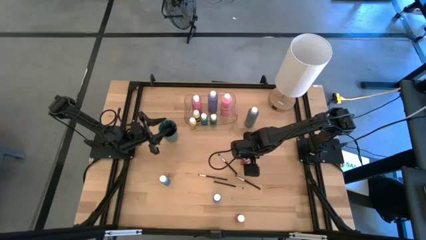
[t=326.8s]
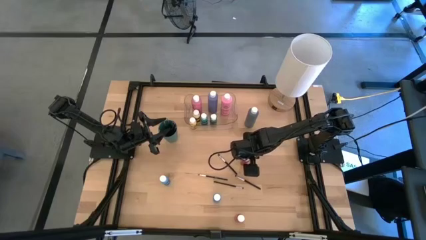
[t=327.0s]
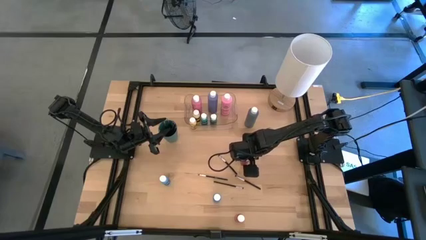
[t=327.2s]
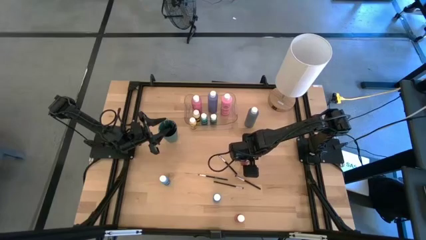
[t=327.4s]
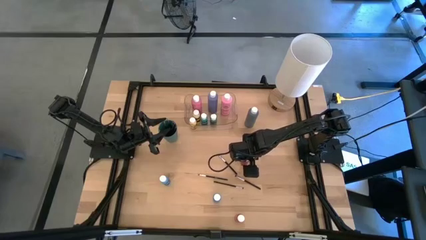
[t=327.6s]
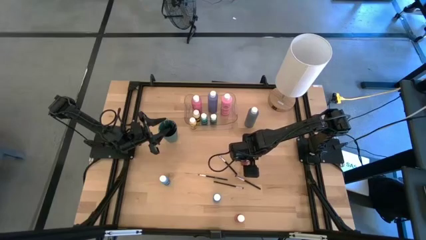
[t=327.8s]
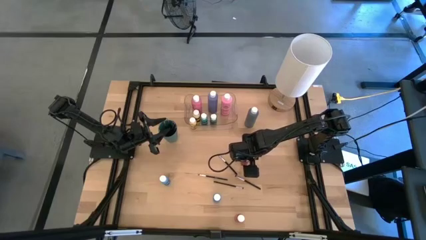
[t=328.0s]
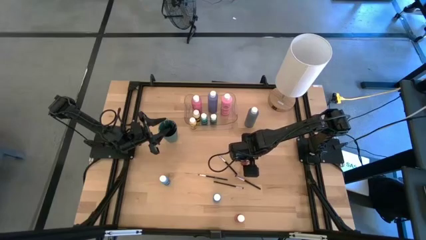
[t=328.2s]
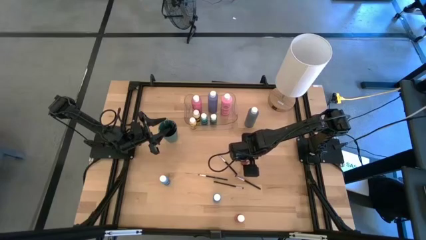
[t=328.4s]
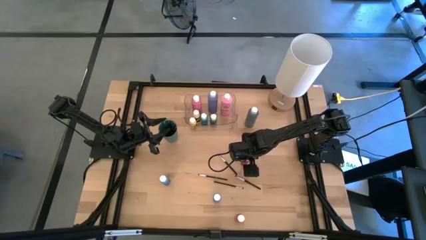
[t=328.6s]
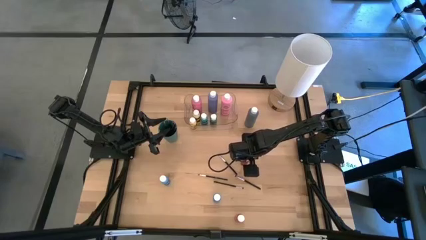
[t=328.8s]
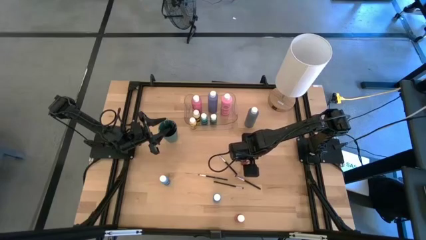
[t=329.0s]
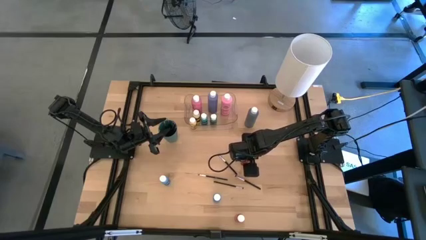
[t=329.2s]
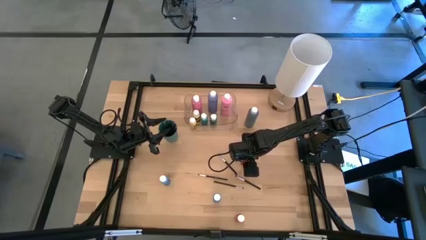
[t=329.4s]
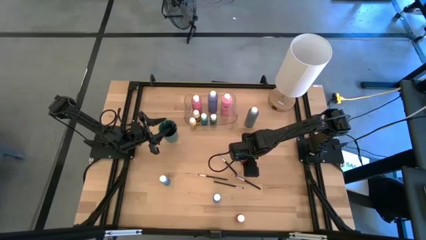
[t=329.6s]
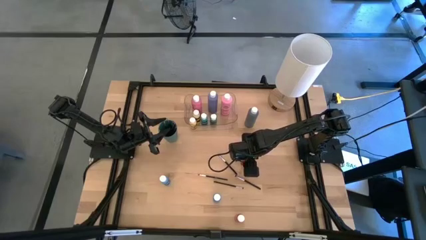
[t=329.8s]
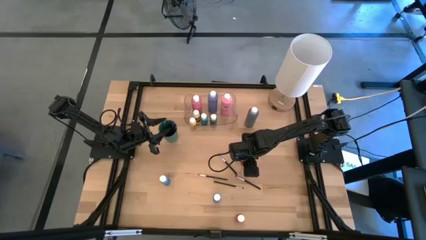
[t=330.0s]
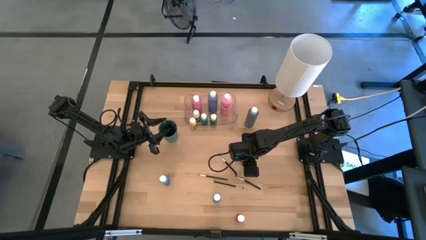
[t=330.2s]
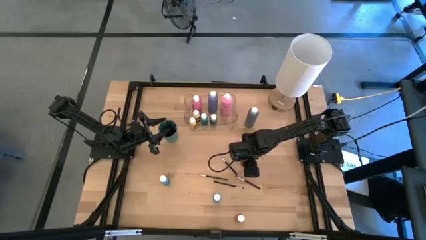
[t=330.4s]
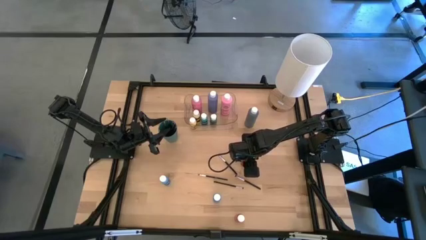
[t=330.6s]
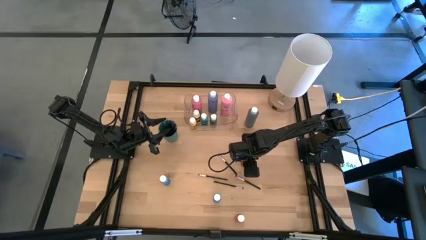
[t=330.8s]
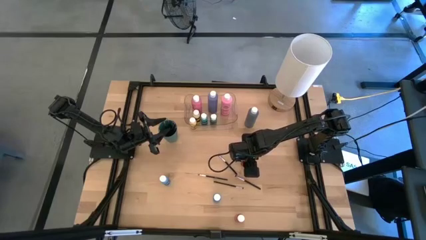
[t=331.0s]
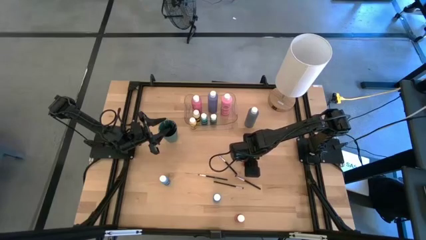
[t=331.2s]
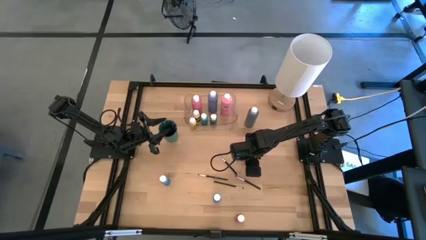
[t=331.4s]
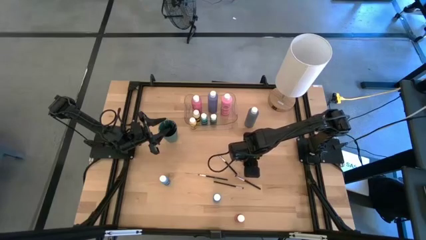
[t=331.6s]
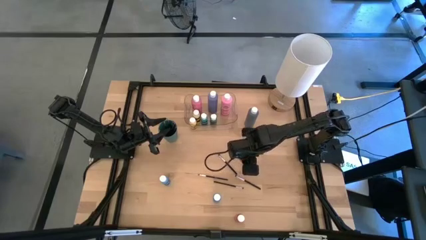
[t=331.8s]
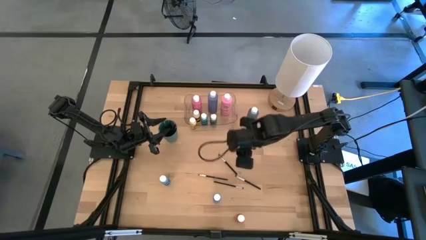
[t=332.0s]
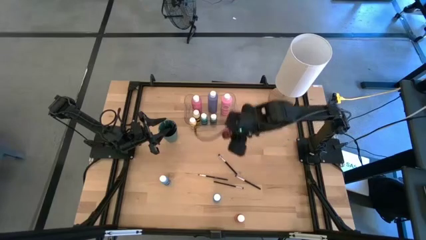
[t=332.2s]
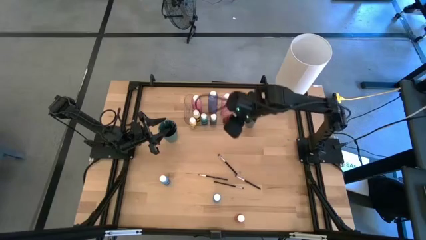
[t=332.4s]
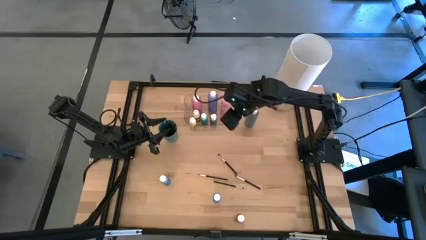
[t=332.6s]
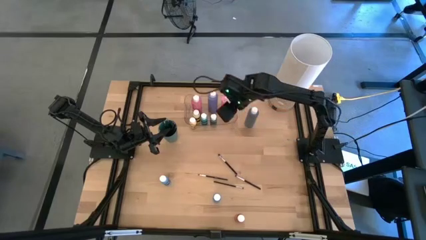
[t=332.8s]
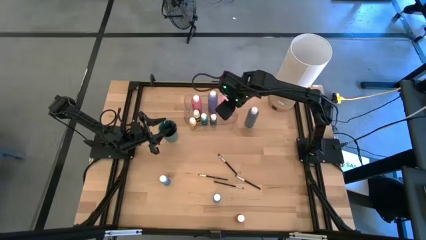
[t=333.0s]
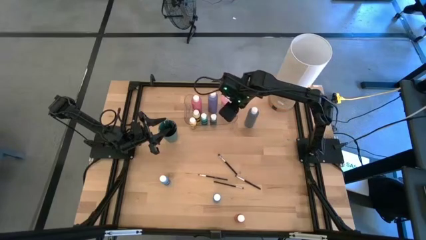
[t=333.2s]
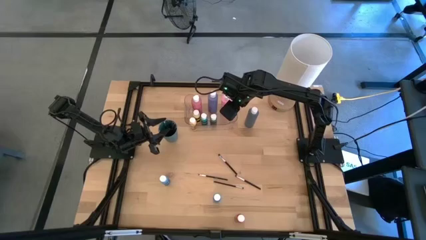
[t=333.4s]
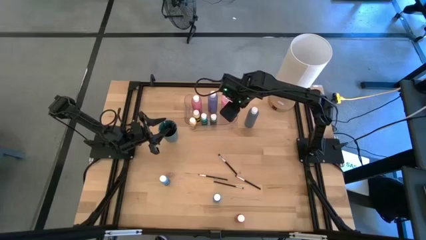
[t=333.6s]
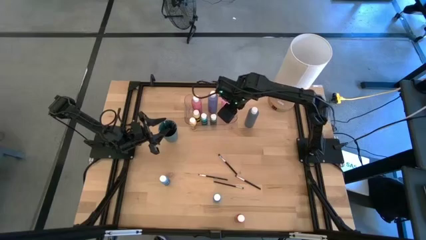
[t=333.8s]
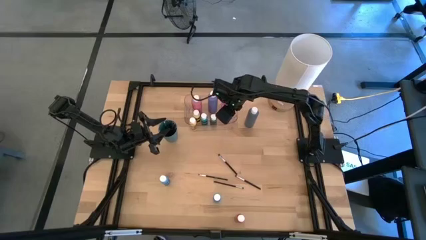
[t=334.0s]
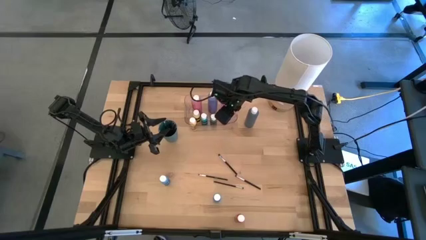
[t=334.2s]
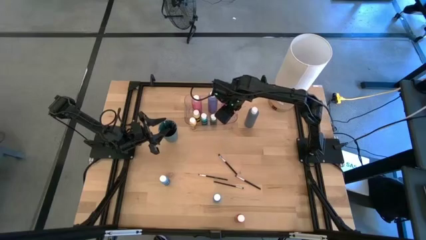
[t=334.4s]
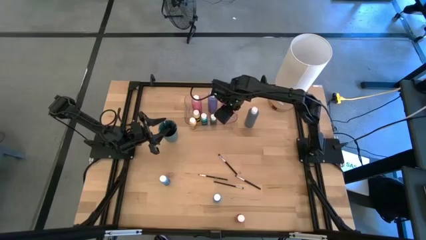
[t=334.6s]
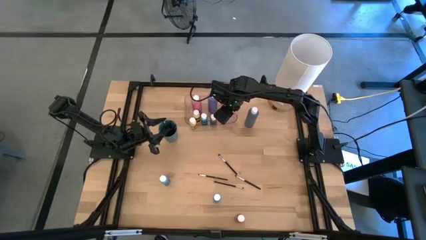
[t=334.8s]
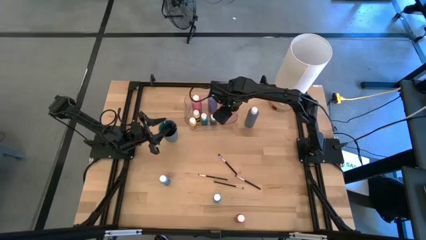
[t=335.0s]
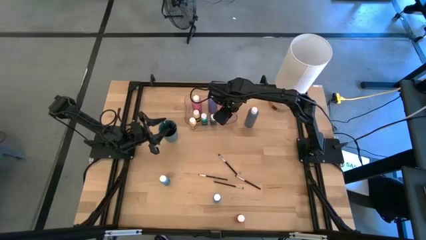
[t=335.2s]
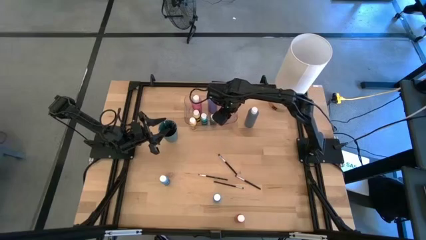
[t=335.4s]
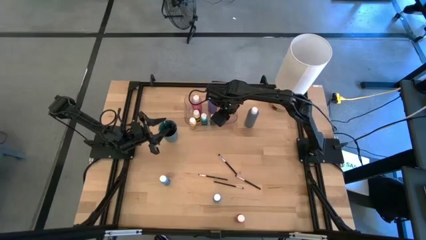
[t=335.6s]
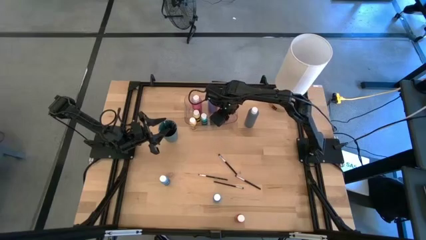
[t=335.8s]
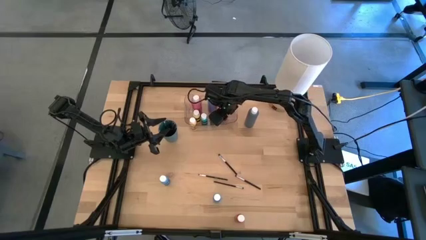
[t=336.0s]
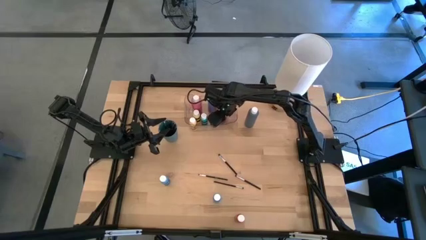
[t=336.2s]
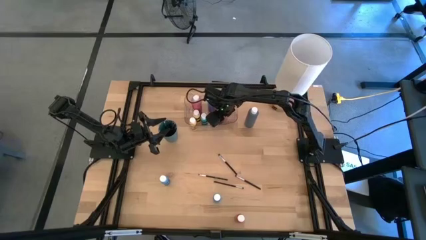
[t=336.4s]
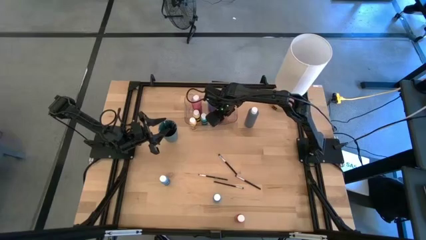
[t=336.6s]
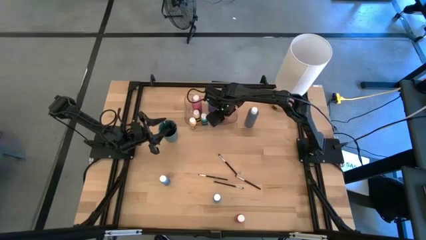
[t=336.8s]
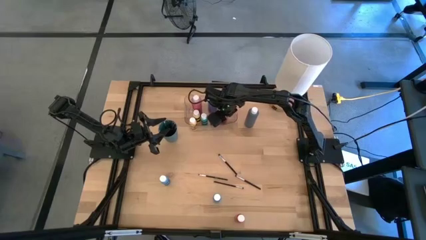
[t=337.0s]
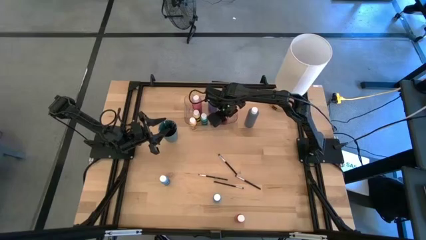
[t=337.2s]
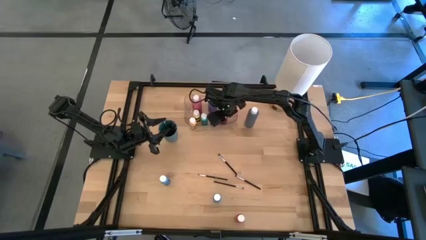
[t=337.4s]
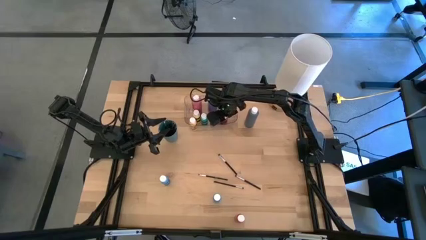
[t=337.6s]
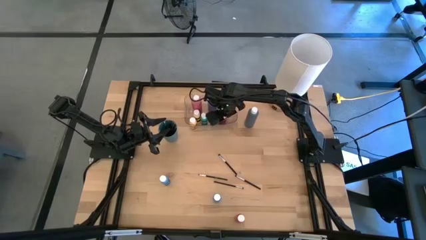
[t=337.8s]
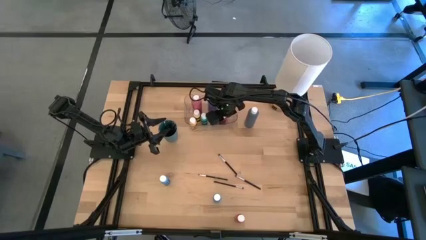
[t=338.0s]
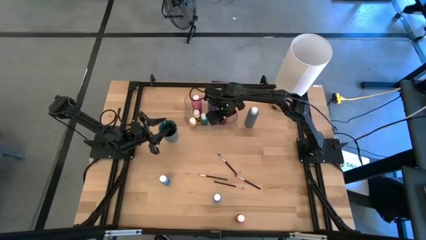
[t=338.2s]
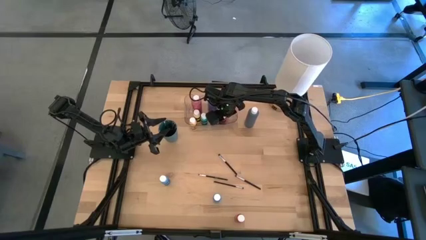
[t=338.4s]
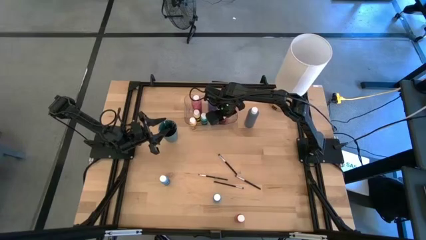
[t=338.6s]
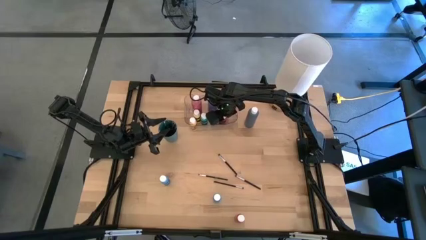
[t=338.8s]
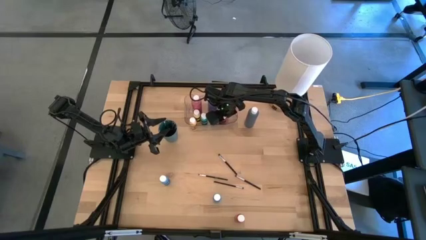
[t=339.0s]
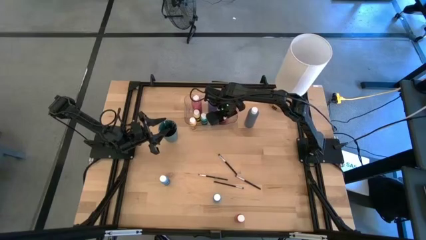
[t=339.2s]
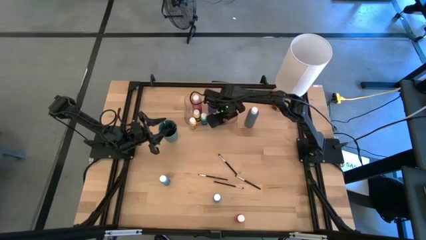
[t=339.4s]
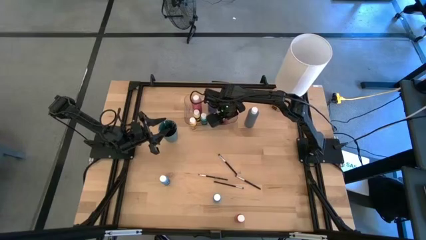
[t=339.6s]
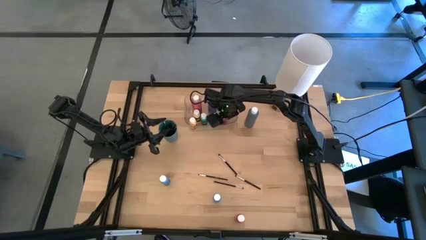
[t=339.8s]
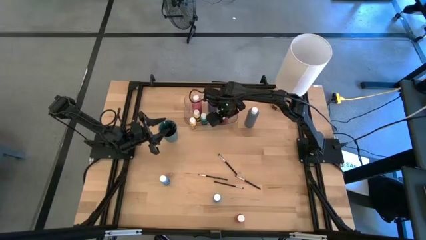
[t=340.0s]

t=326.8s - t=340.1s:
Task: Pick & Place Paint Supplies
Put the red paint bottle into the transparent bin

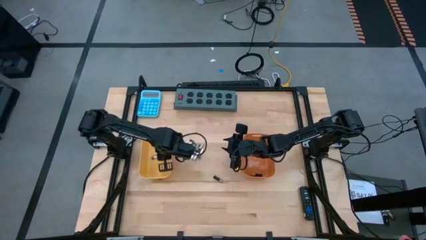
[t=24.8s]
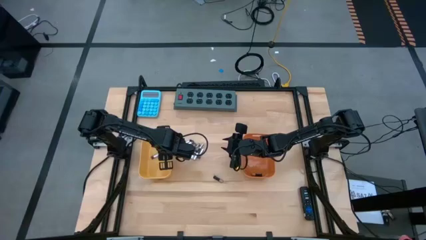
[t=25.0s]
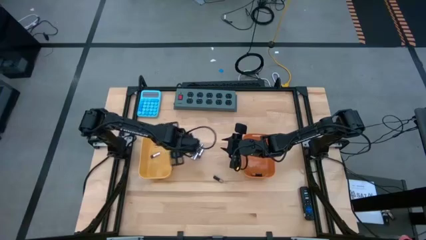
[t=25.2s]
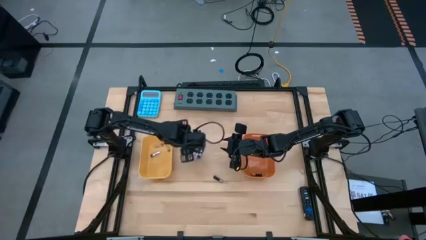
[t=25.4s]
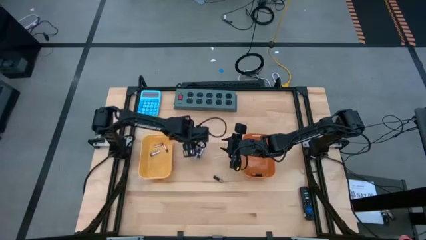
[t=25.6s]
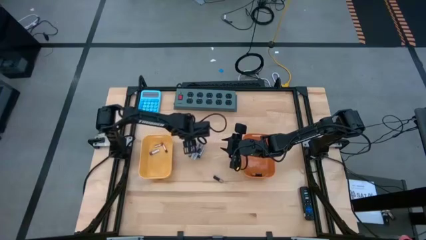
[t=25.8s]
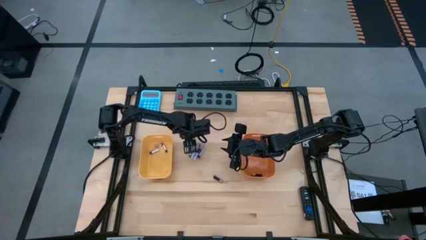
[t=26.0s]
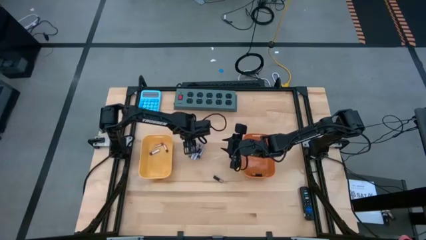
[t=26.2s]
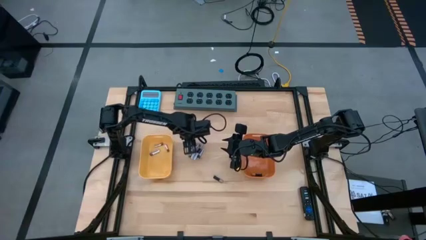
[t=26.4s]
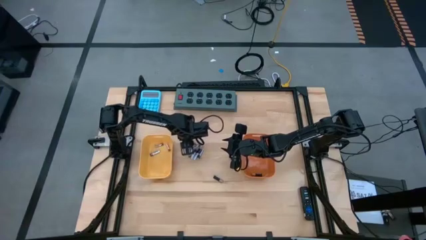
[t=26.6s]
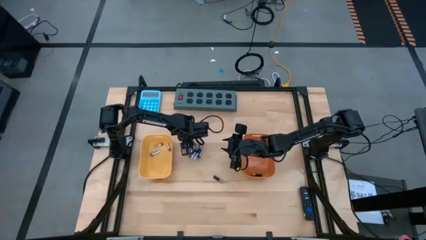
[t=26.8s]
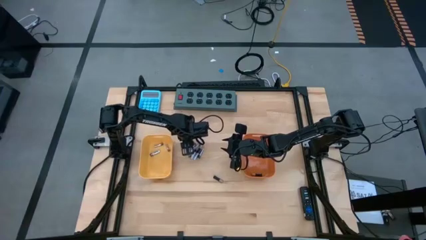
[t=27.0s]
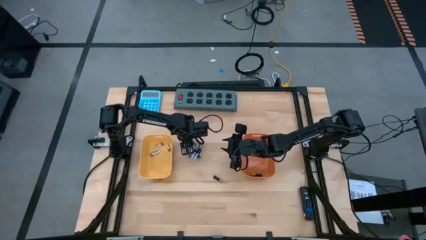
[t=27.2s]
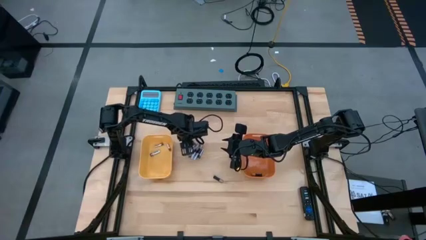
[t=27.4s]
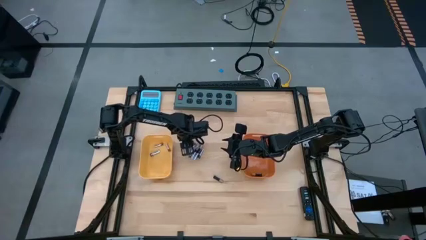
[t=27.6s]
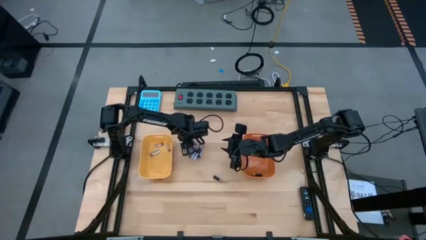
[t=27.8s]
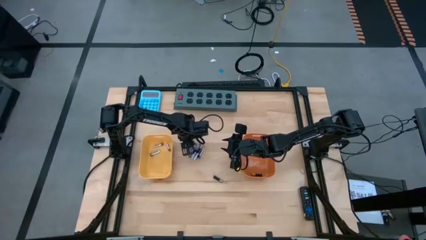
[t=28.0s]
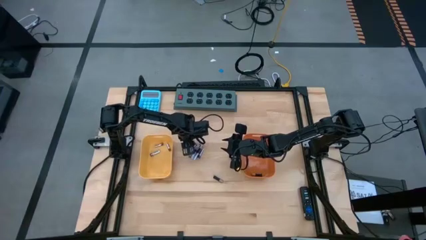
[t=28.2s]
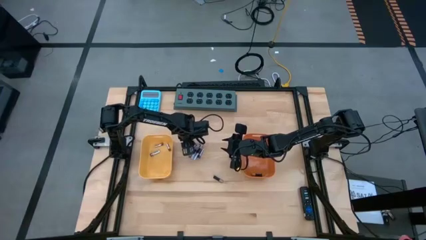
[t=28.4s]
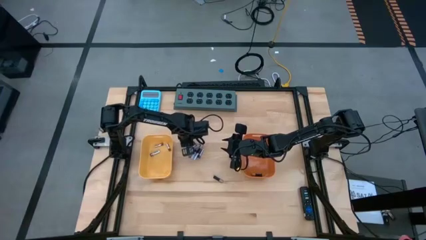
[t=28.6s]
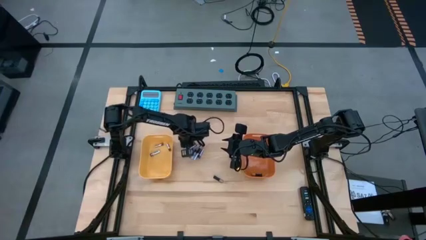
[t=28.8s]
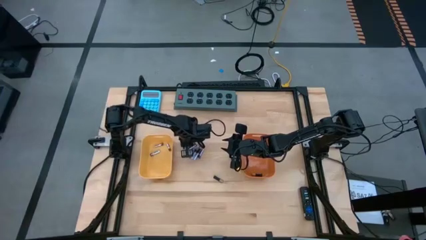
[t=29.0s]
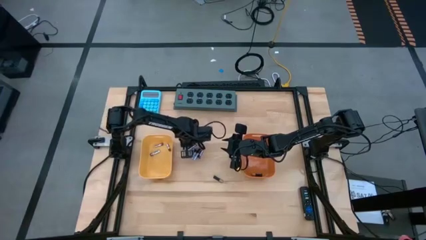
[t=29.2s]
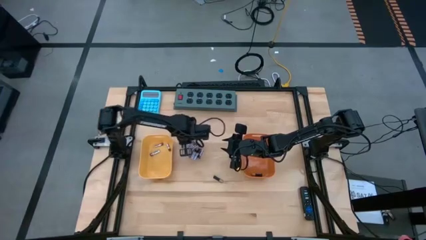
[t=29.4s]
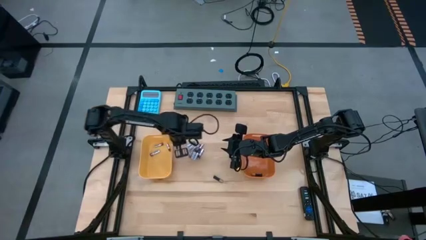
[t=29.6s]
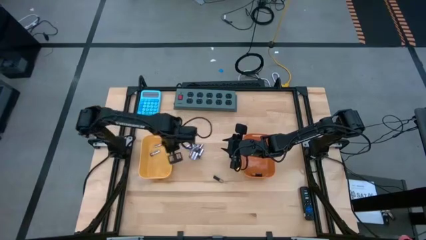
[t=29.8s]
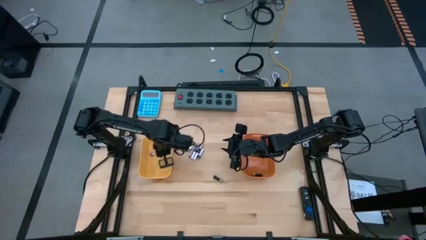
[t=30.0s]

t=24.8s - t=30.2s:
Task: Sort batteries
Put the silver battery into the yellow bin
